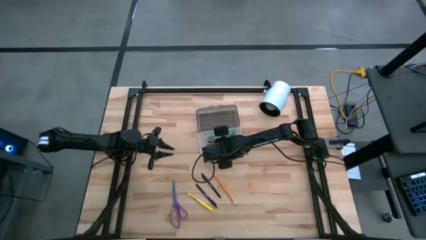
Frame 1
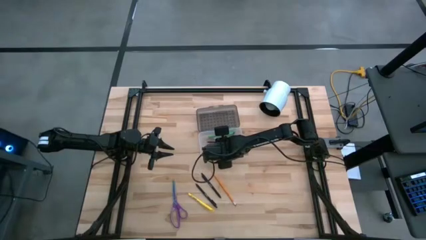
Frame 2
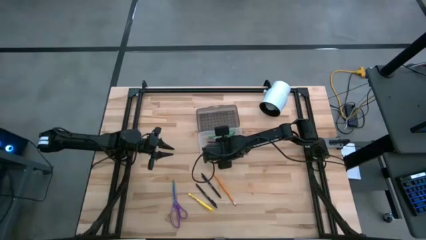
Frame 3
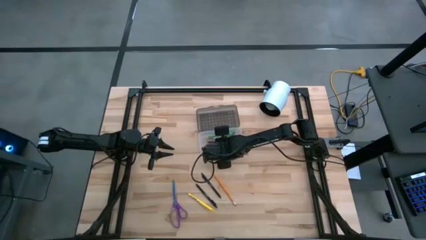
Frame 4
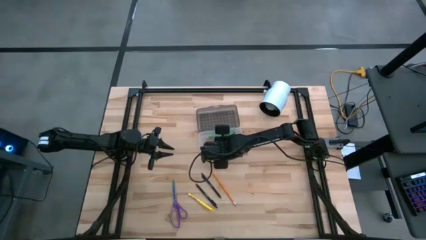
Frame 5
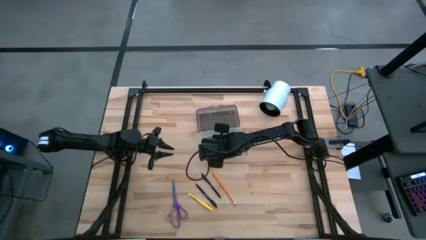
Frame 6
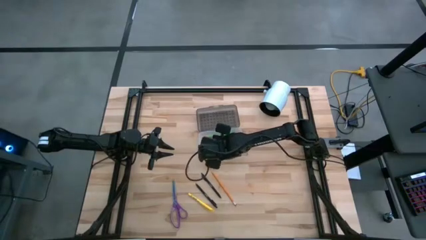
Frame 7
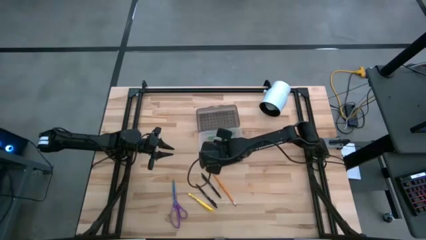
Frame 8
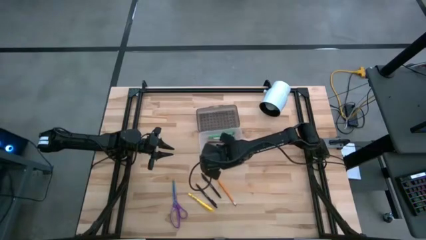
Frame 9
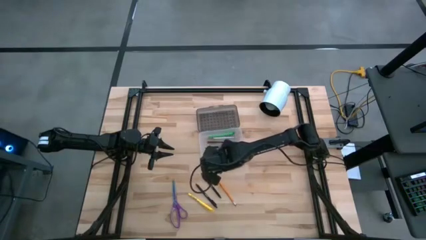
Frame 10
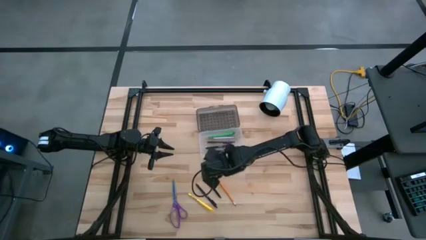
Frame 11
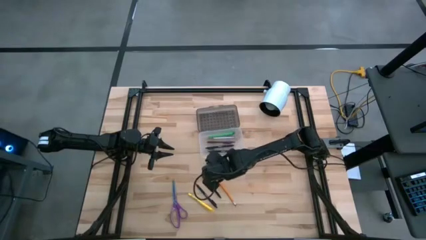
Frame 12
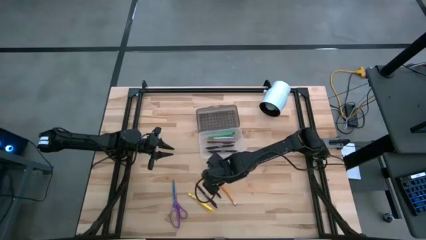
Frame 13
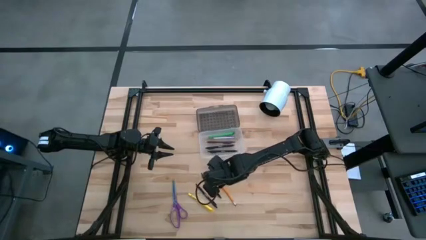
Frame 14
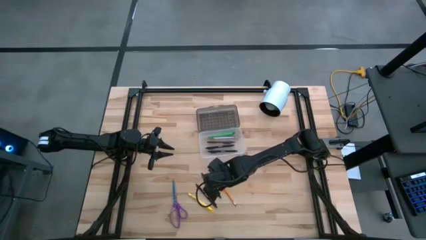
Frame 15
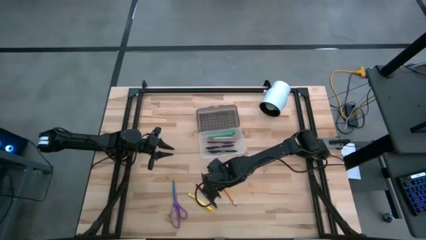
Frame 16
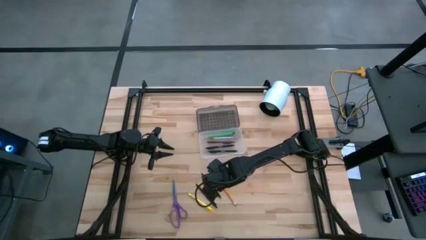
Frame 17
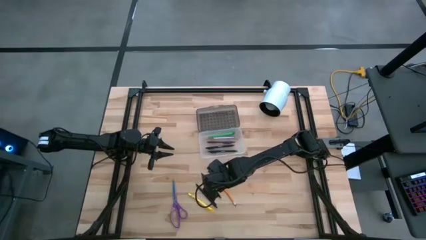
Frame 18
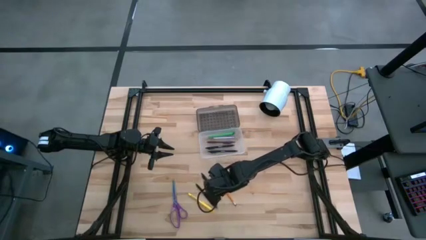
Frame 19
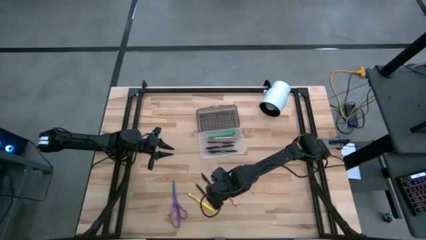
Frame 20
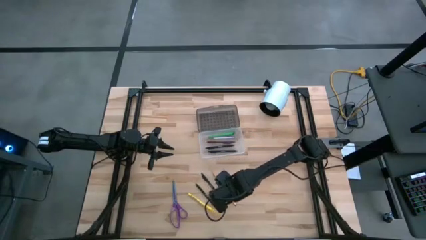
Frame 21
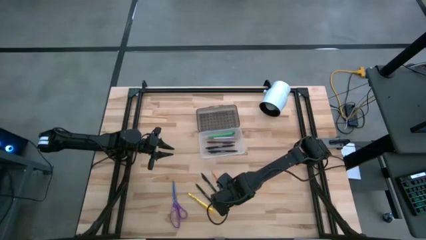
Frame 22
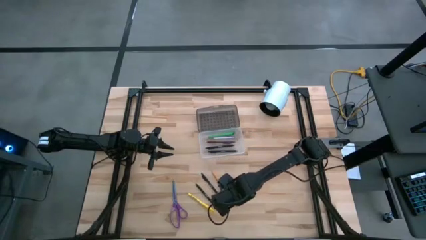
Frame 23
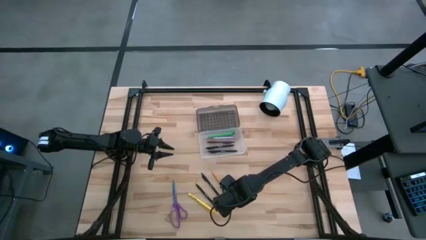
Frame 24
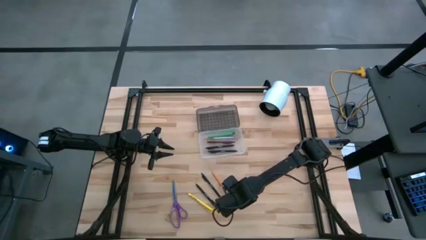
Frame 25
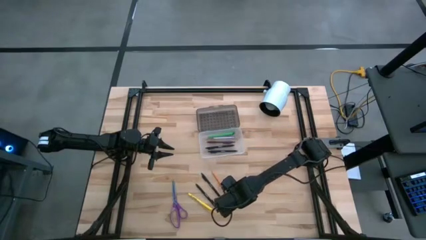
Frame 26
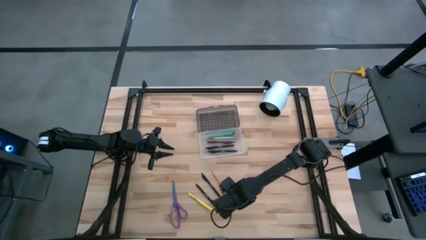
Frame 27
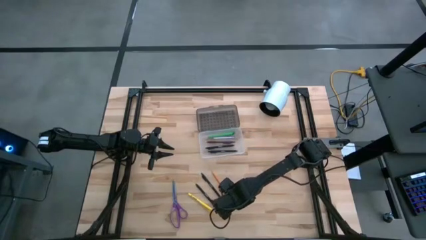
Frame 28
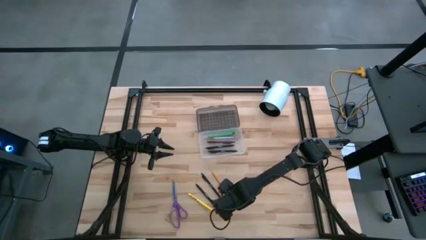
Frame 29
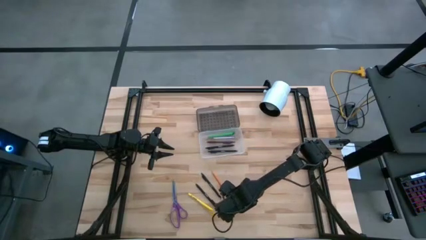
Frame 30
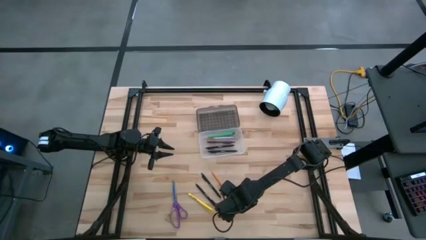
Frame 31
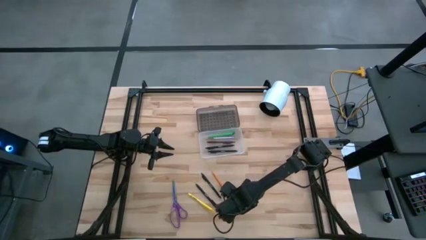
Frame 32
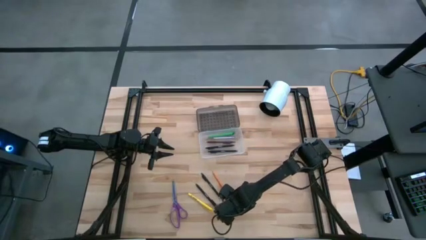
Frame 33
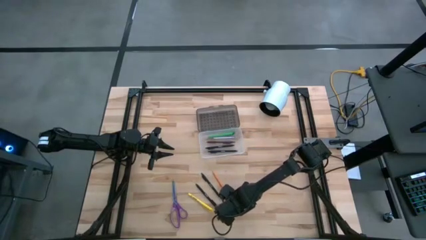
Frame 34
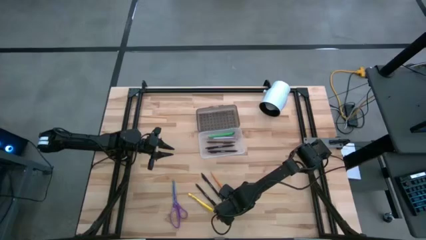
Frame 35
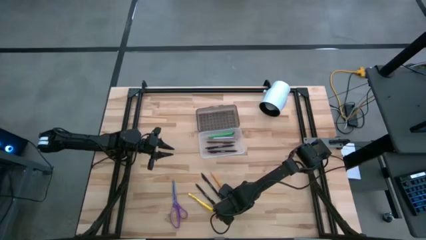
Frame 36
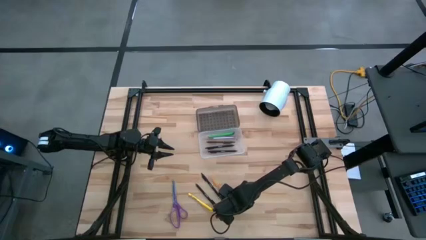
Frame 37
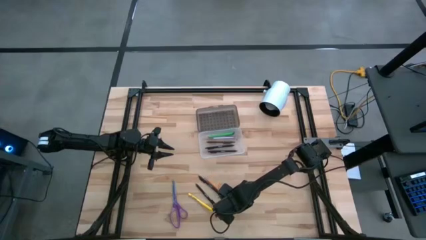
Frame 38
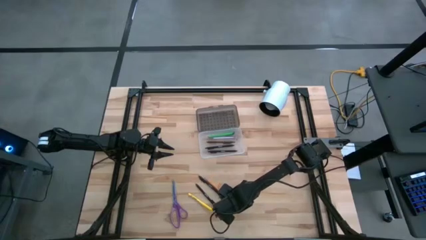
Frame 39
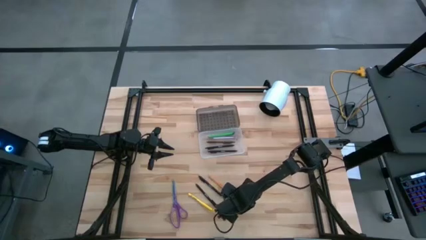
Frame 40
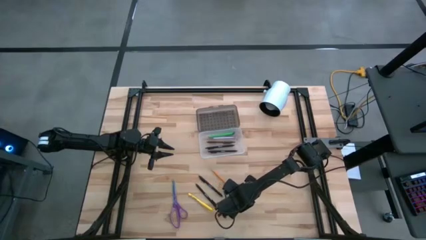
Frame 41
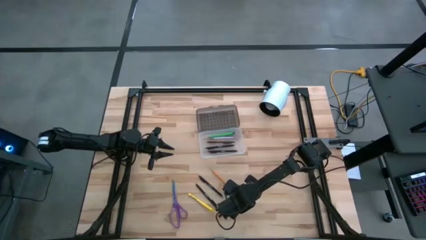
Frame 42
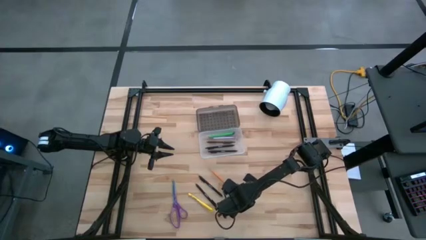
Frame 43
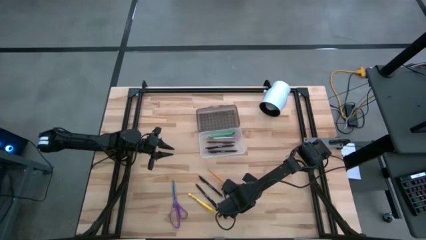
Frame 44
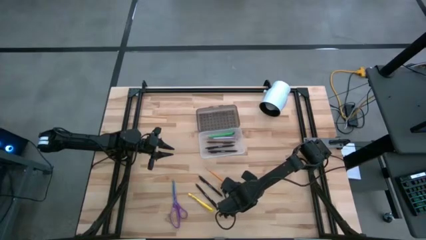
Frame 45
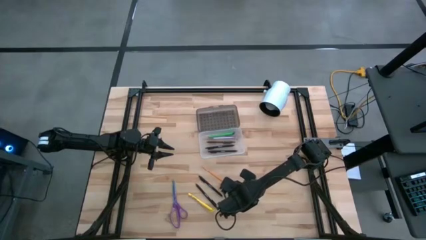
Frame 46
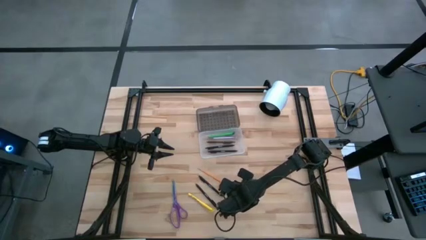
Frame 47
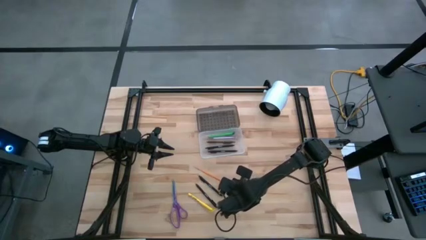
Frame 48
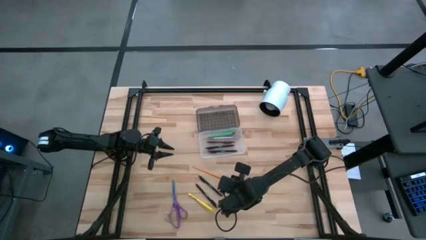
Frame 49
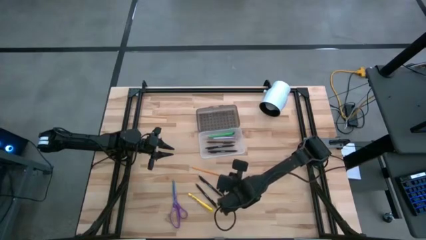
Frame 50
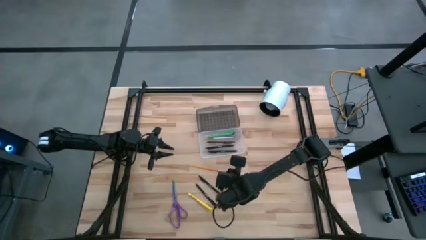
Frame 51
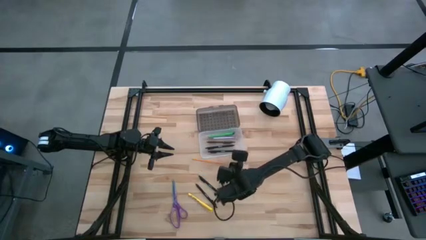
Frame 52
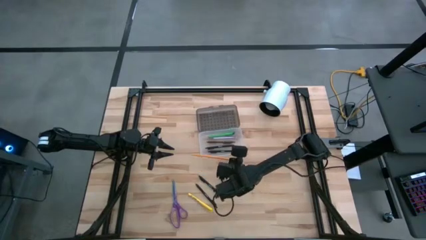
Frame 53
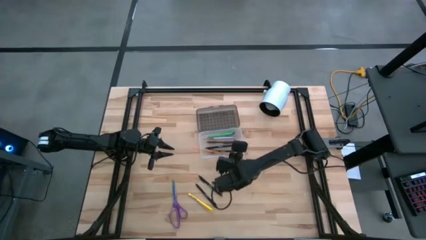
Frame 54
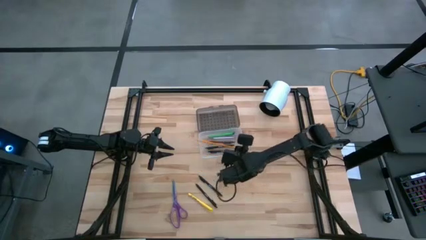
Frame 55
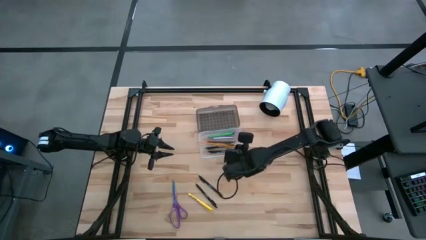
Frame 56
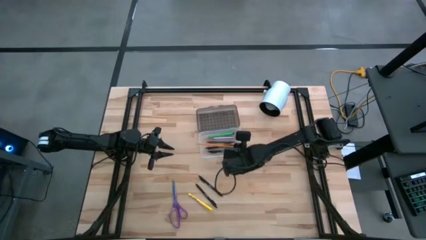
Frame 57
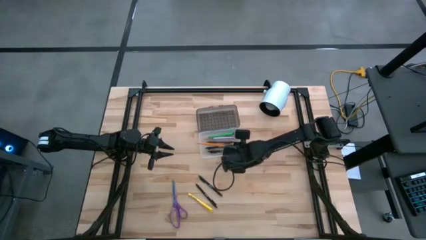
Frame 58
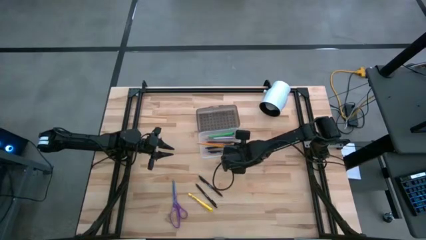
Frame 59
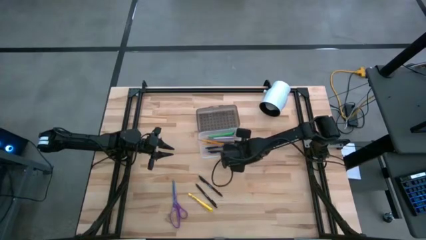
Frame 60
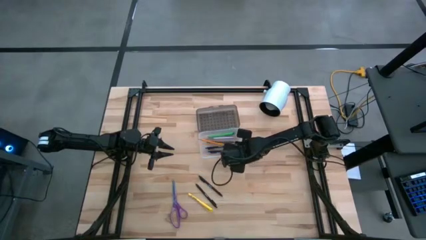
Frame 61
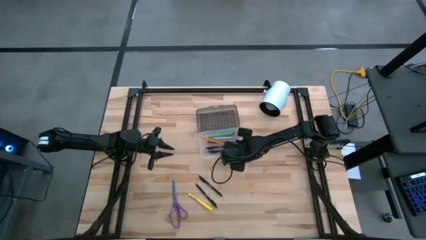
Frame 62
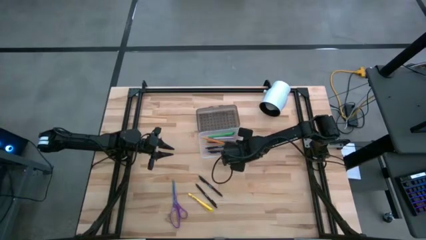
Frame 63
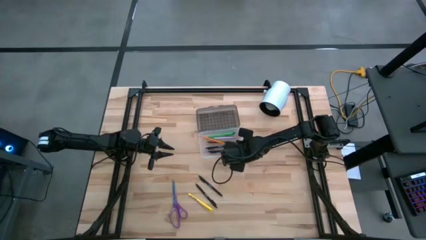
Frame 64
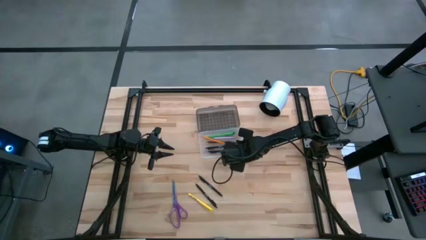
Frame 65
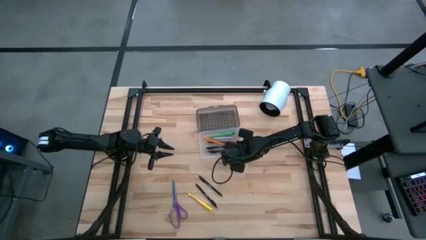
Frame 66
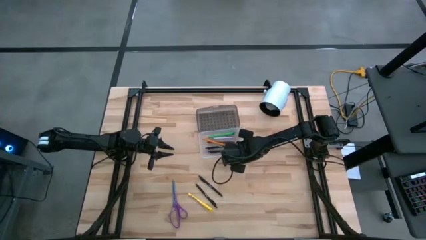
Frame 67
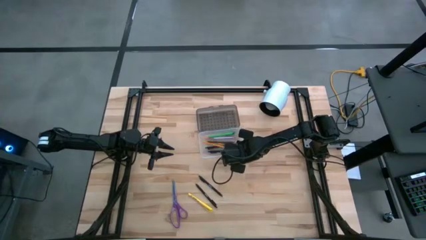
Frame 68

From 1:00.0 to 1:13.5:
Task: Pick & place school supplies into a supply box
Put the orange pencil into the transparent supply box
